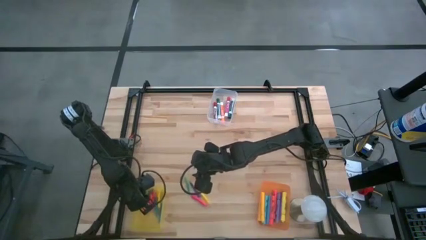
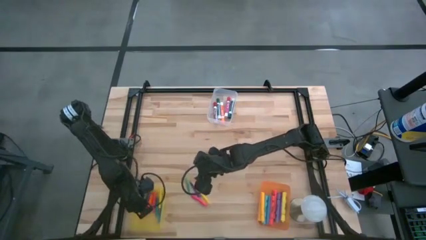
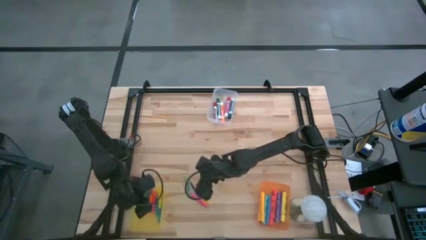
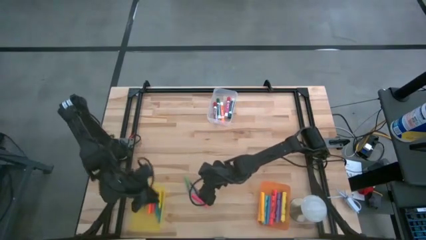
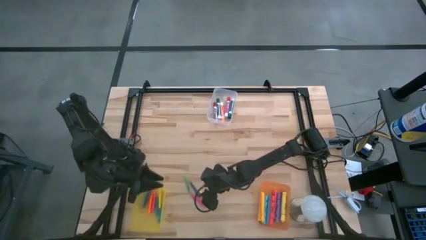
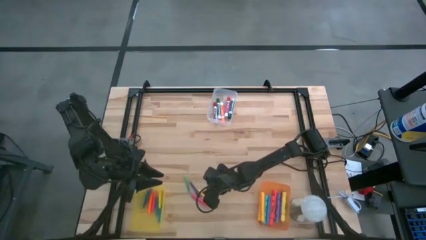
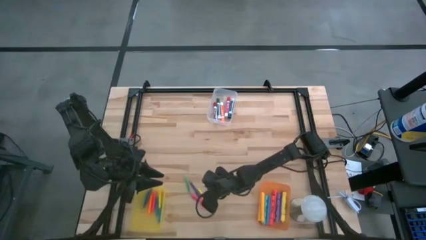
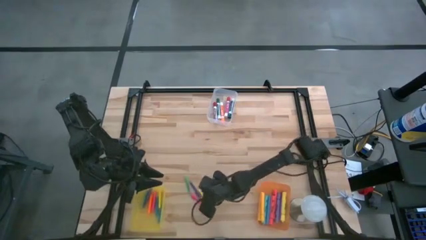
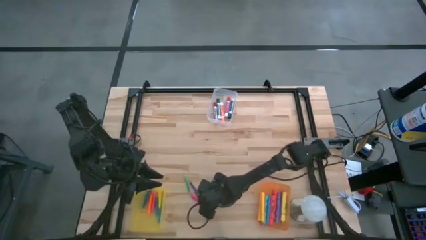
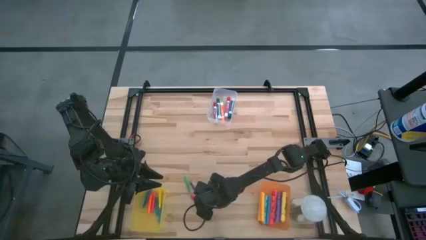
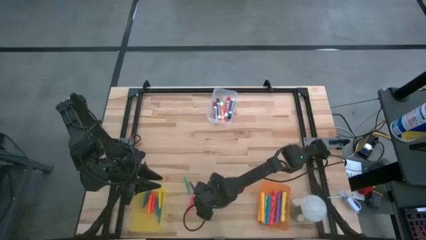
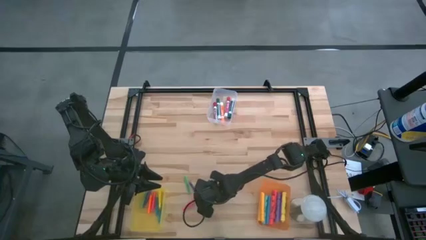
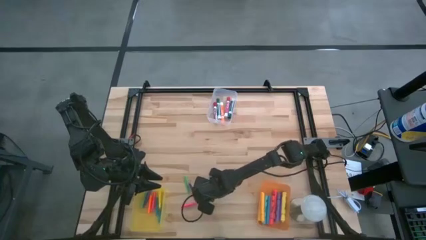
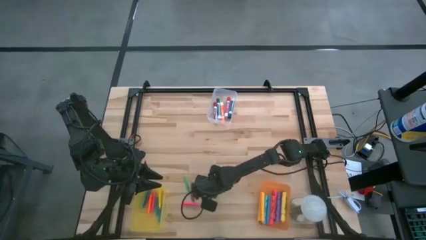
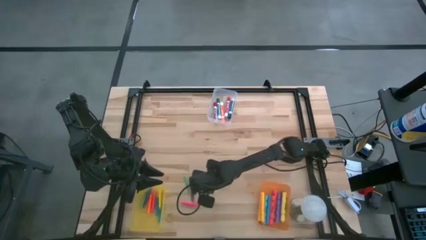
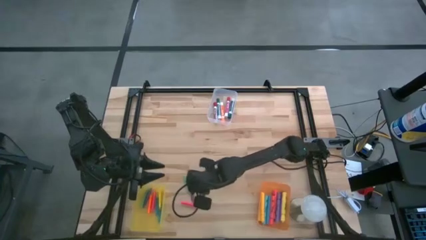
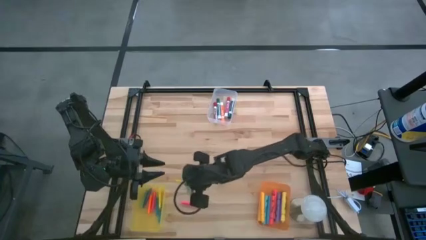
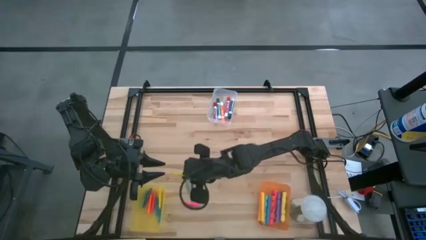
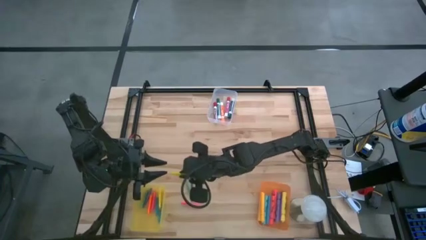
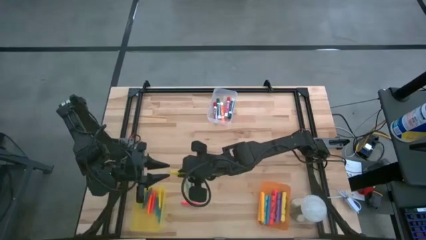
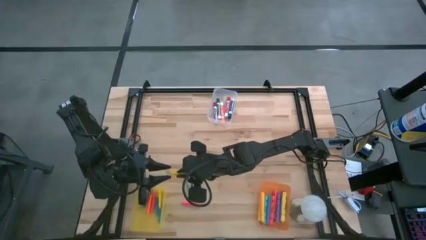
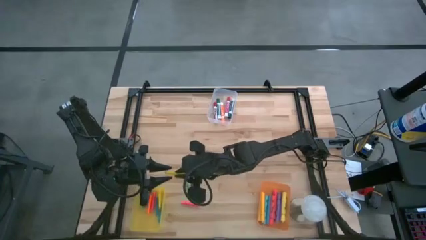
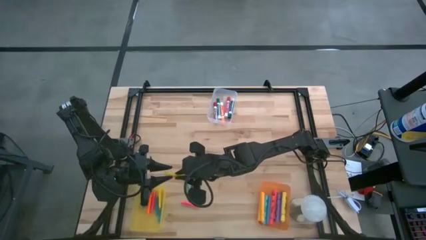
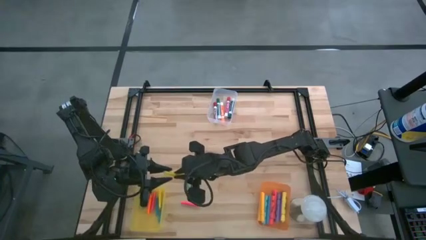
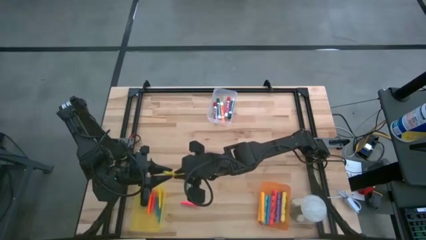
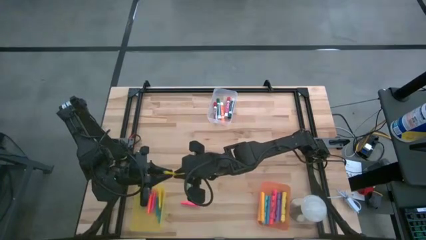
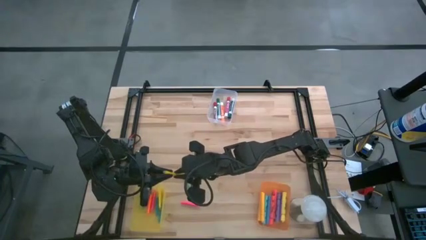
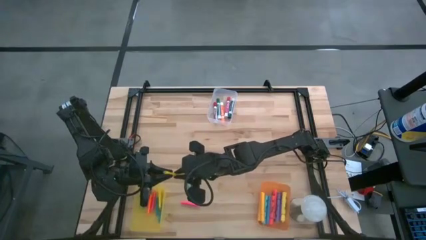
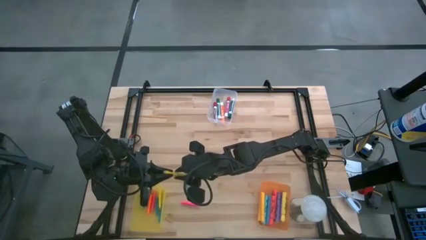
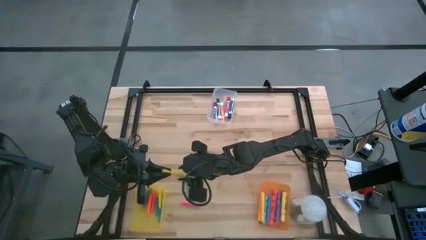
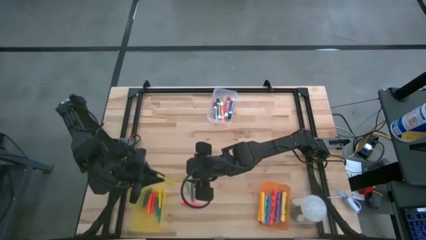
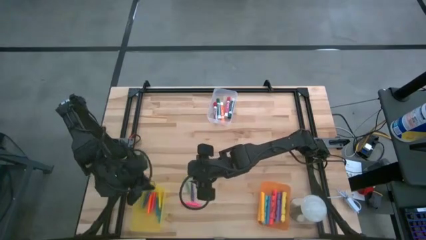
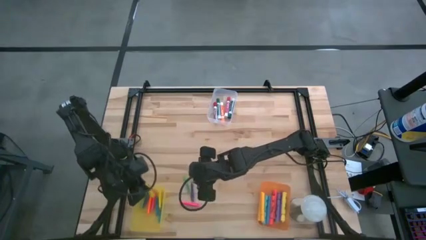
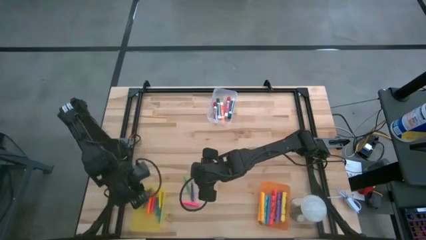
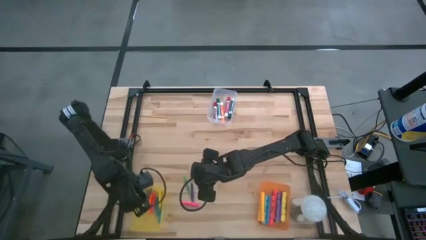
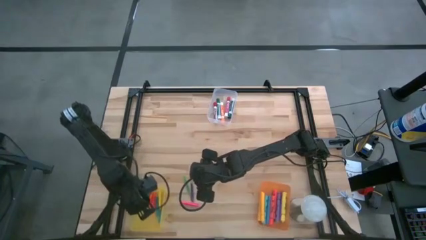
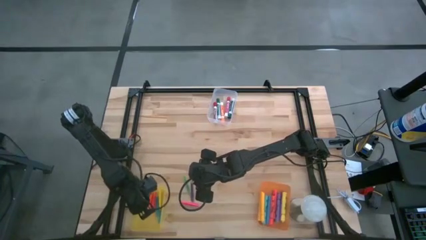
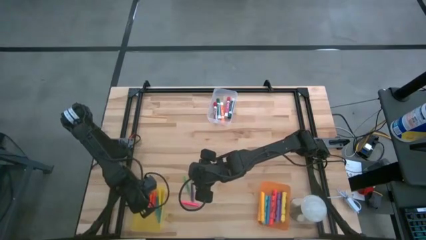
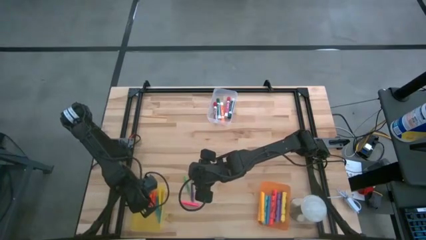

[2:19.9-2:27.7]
Task: Pick & Place Markers
Put the yellow highlighter into the yellow bin

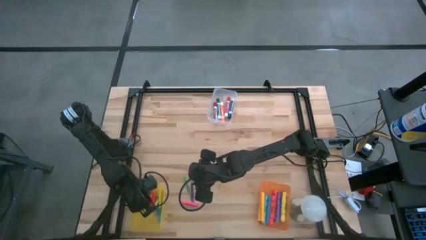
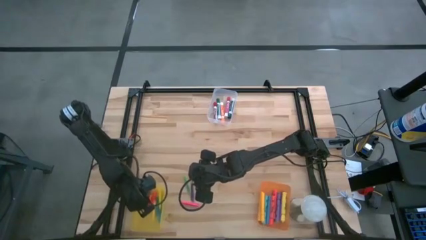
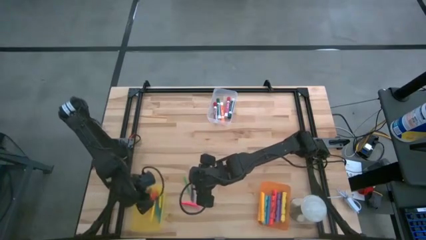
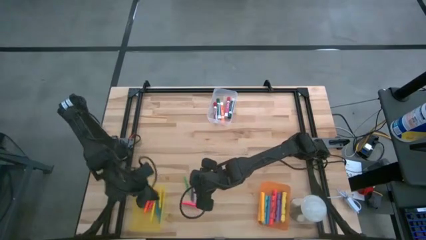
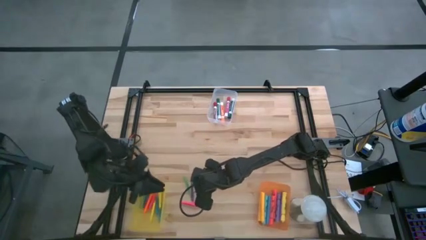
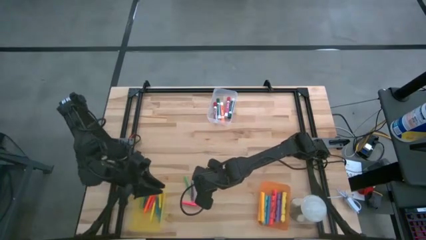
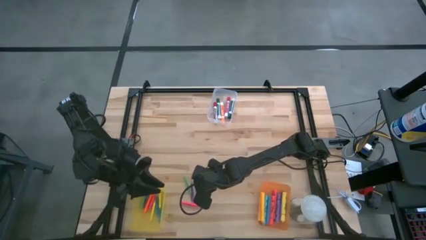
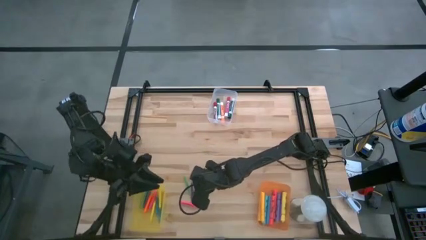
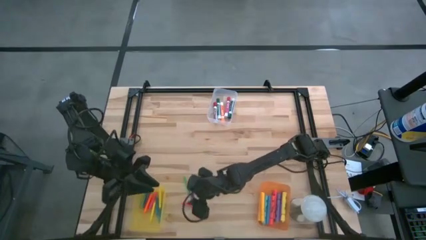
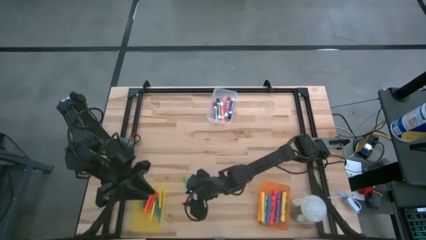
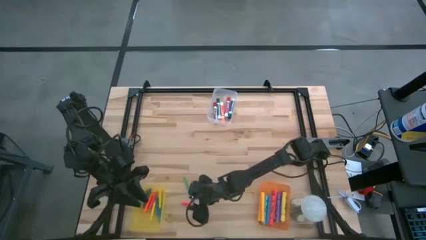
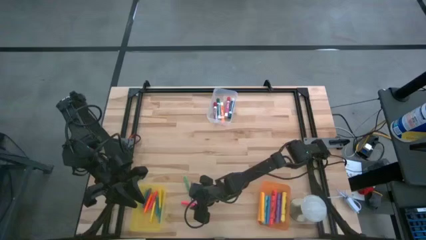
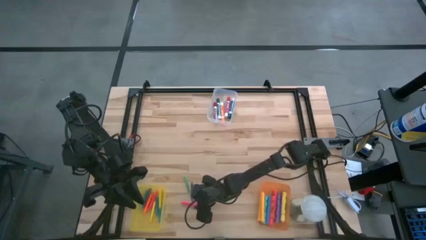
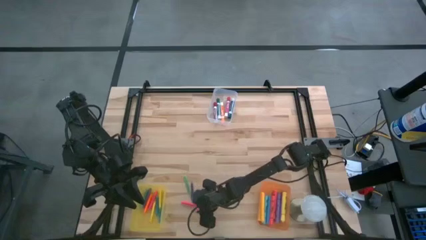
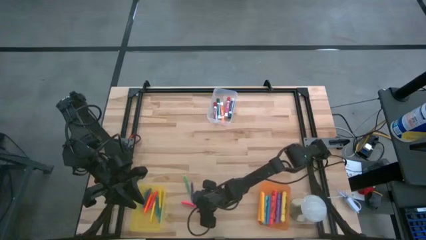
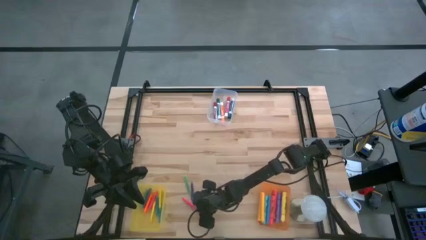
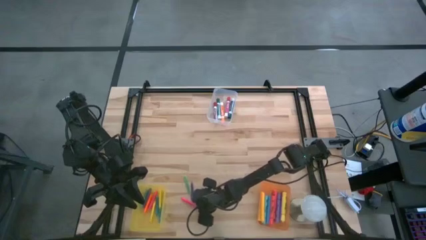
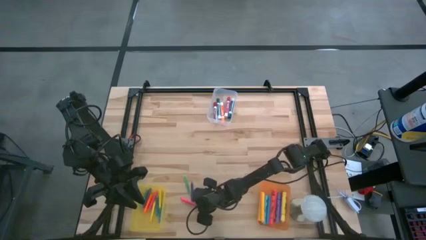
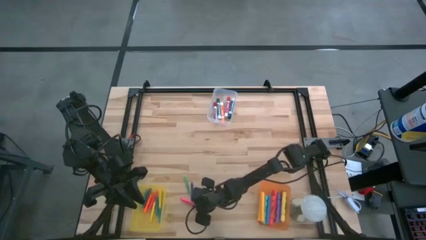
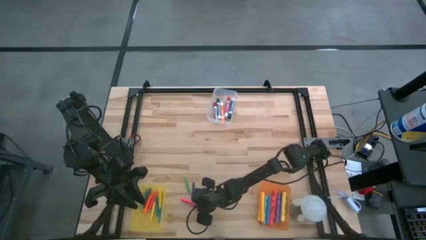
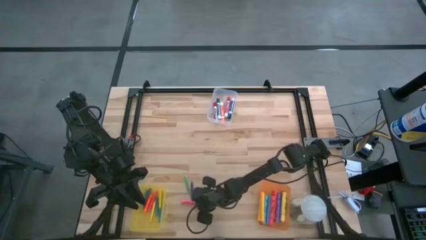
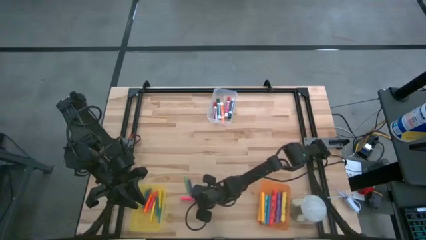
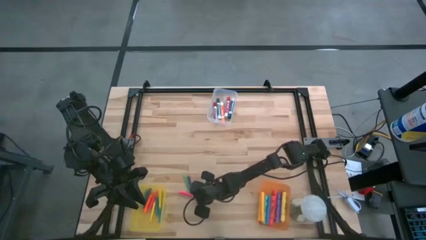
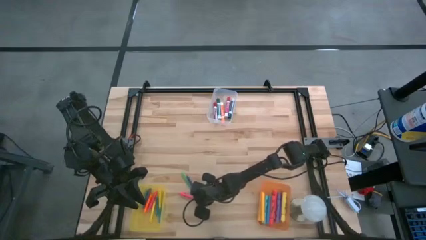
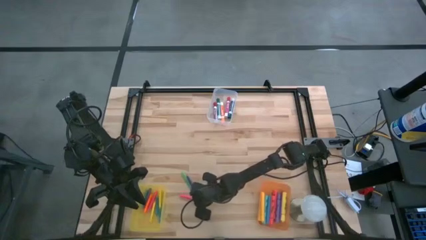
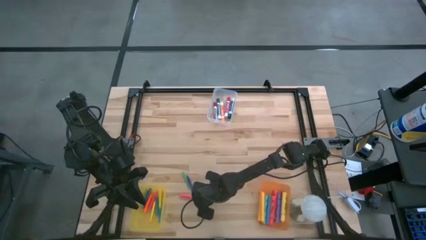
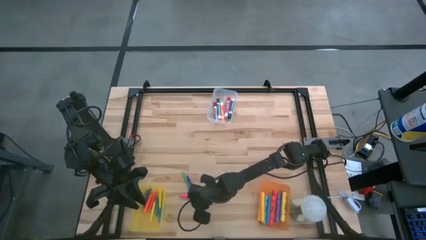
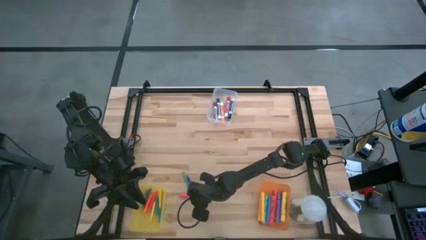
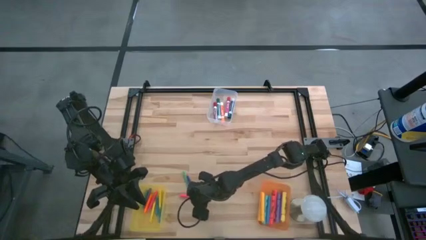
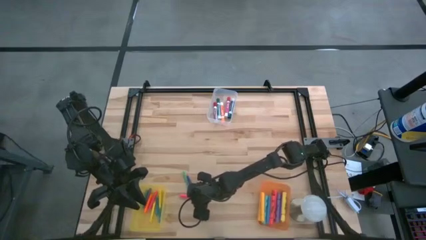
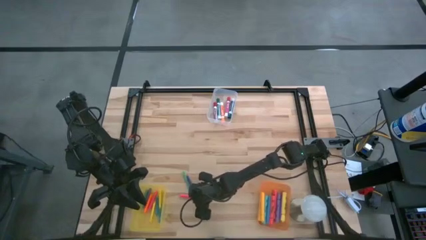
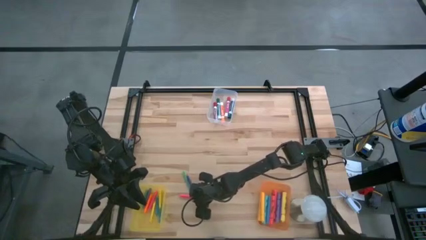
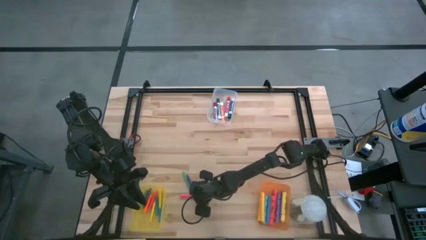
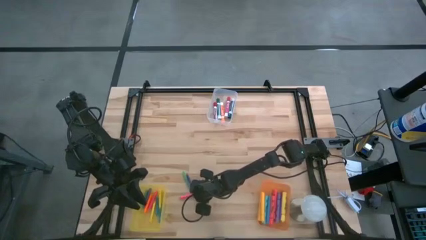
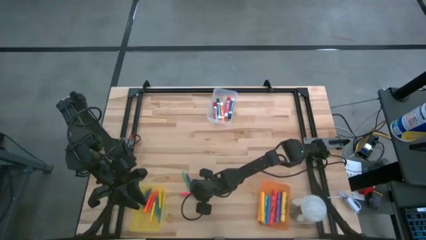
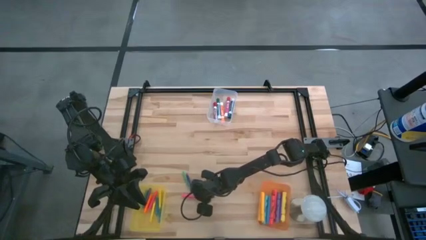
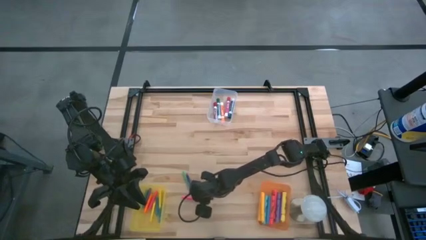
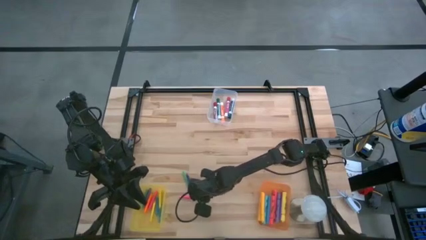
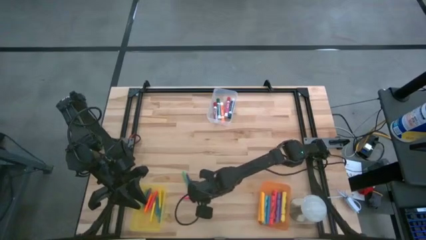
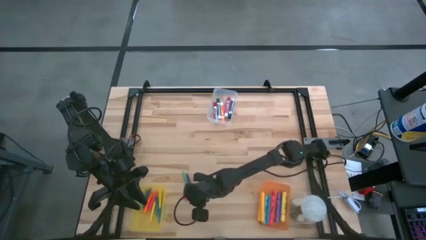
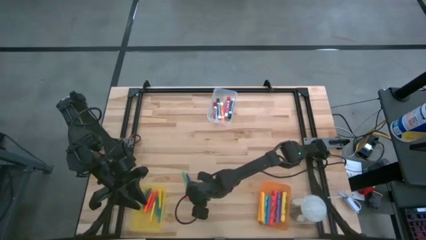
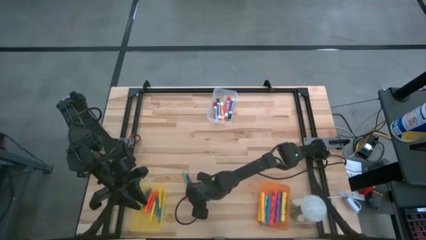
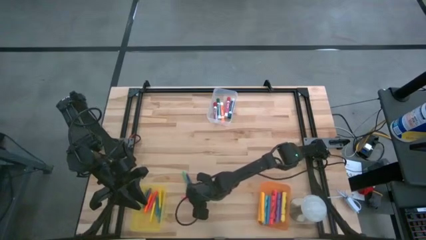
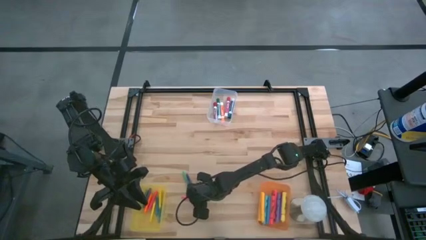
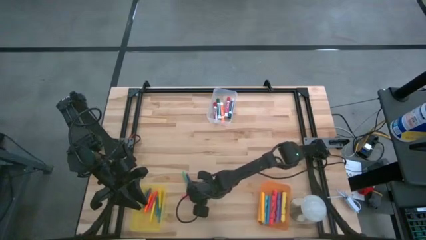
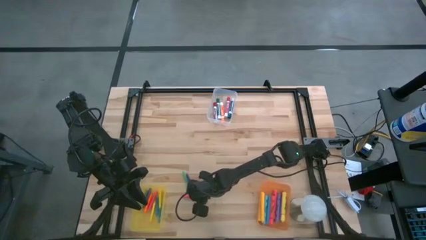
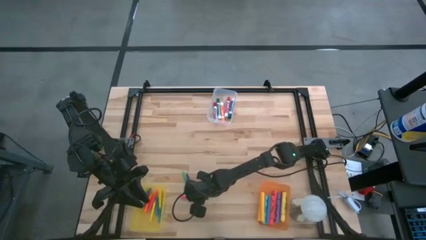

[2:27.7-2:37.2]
Put the pink highlighter into the yellow bin
